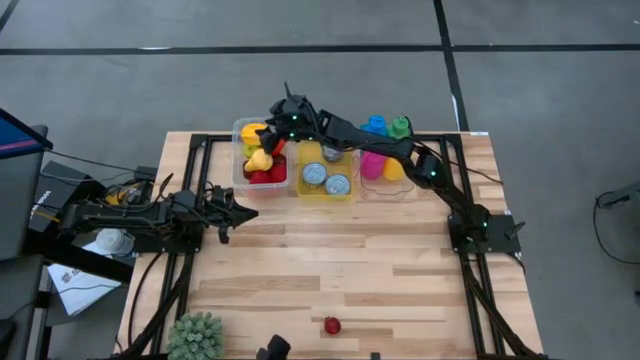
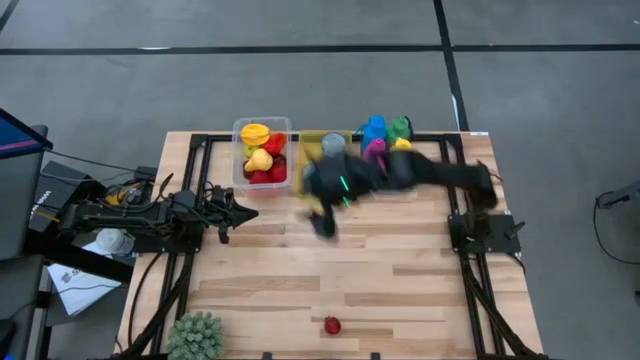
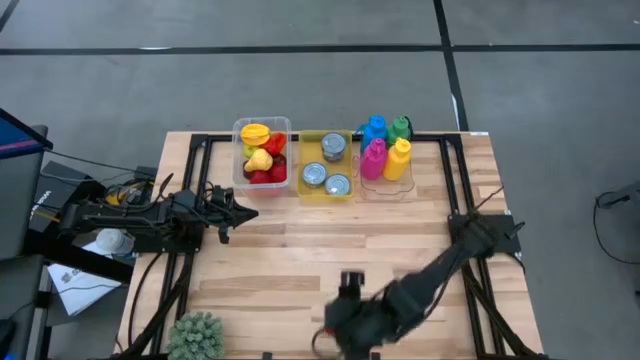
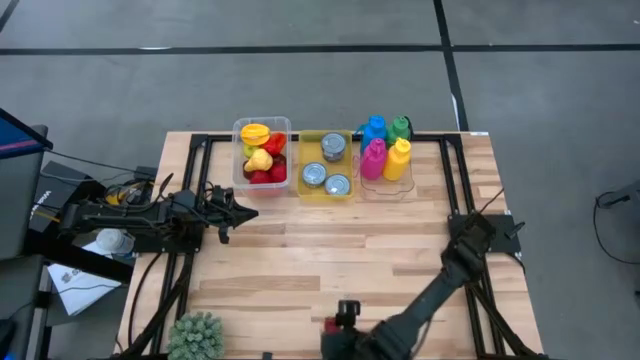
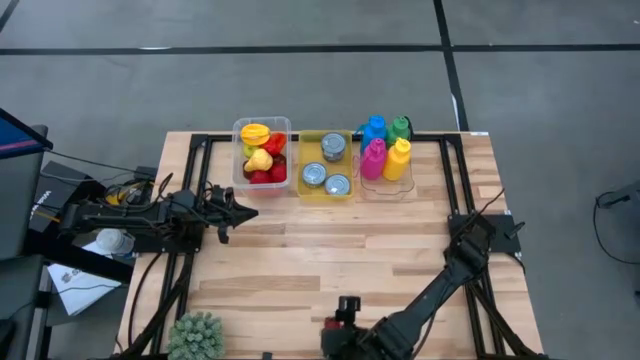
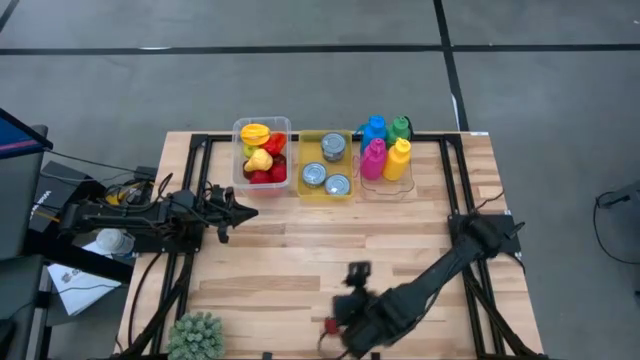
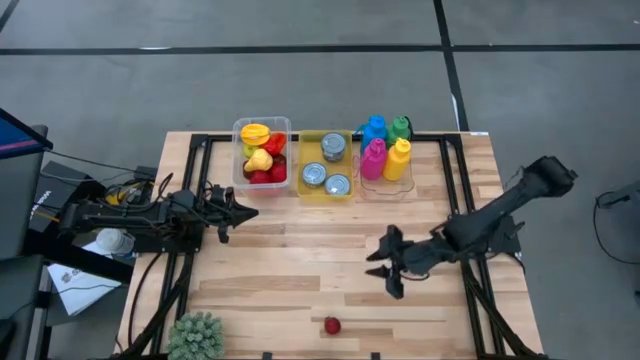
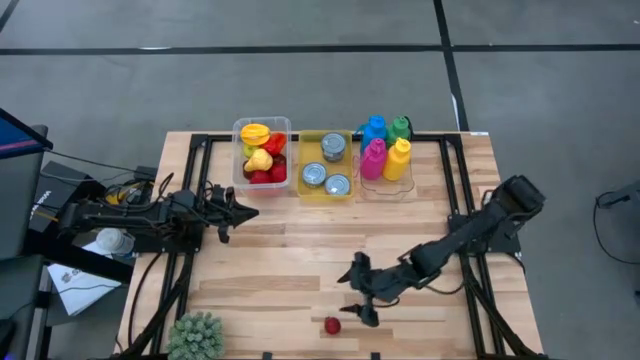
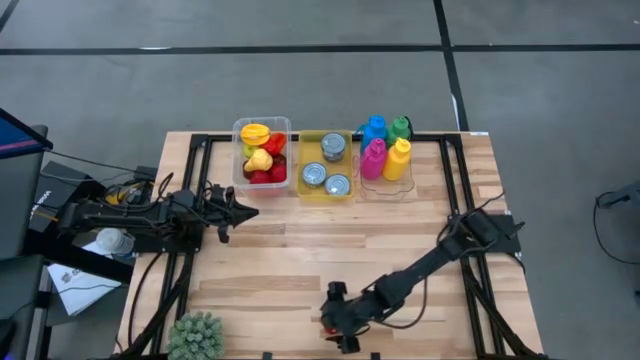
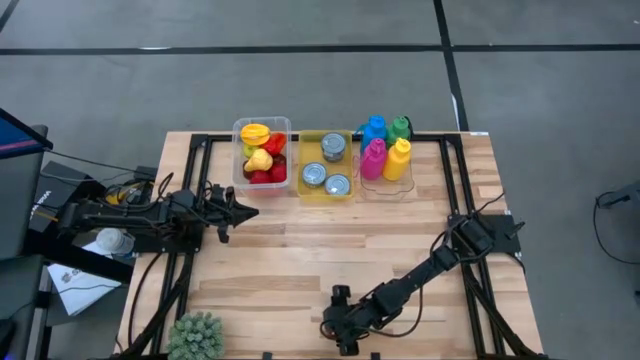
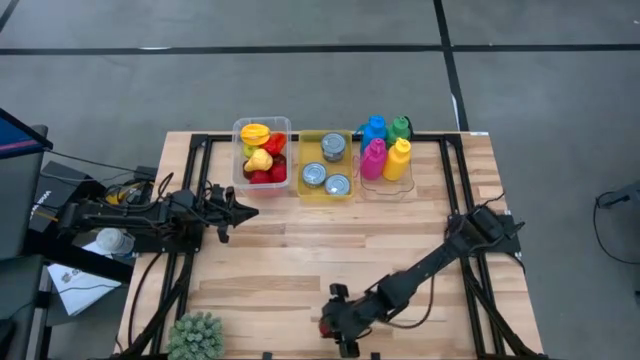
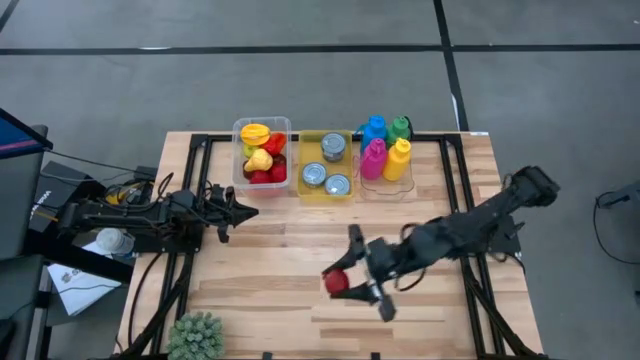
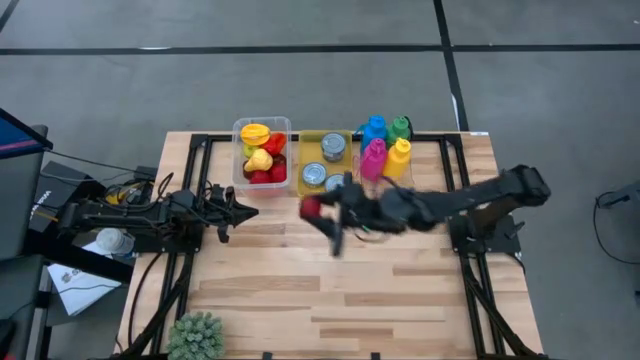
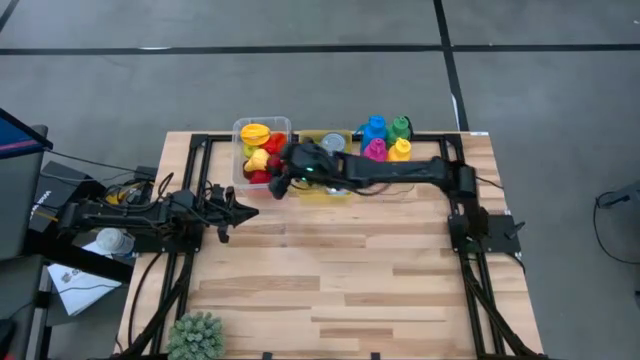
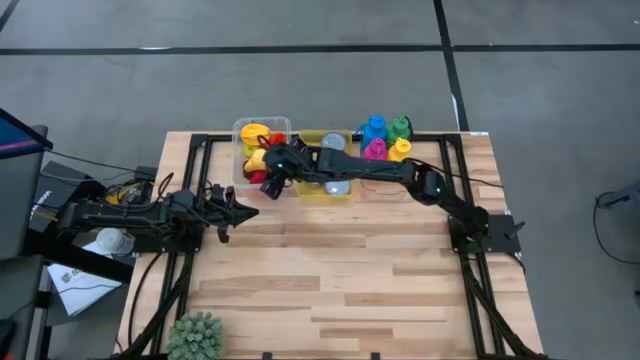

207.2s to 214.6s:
Task: Pick & Place Food Item
Put the pomegranate into the transparent container

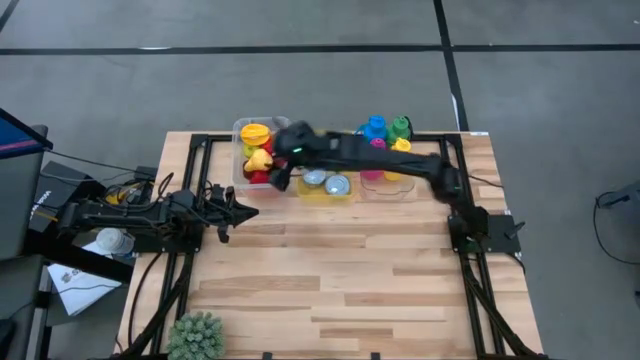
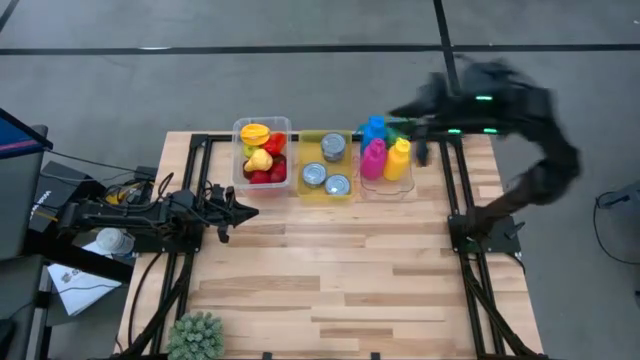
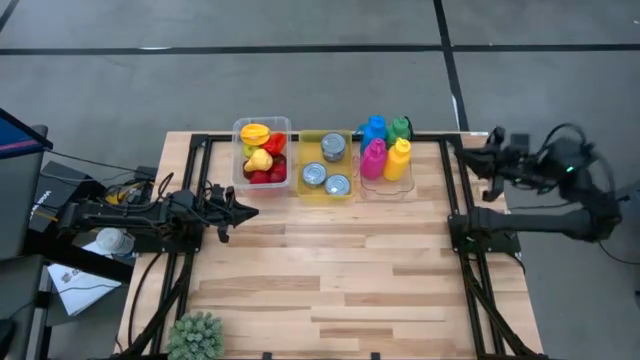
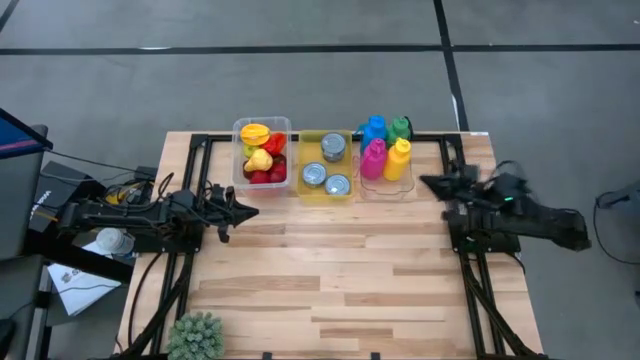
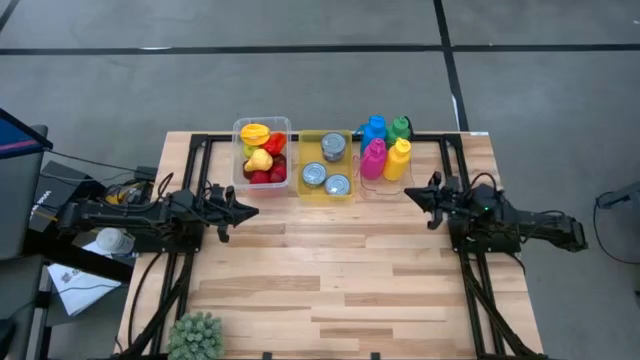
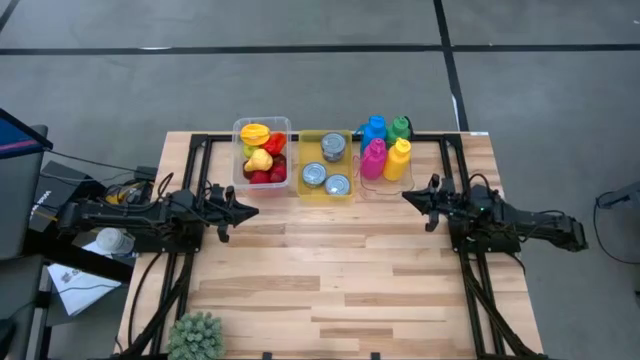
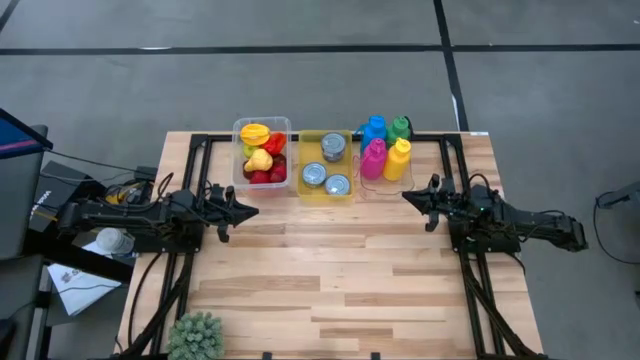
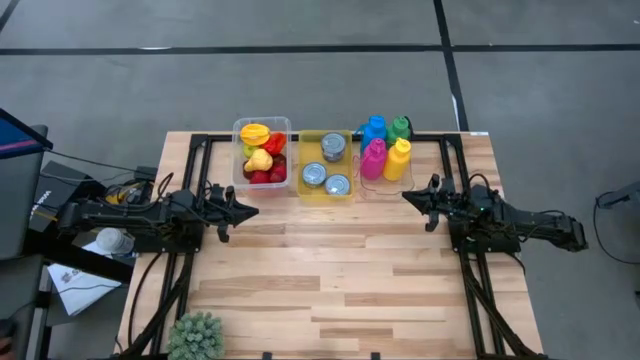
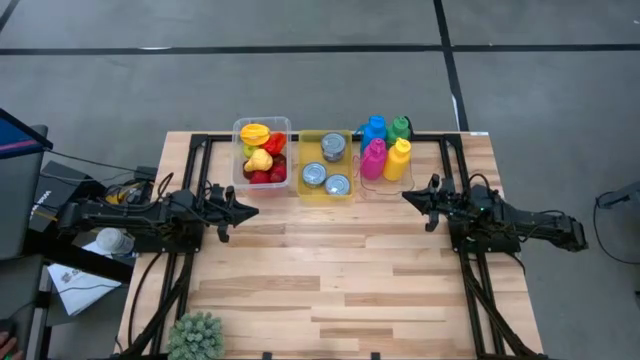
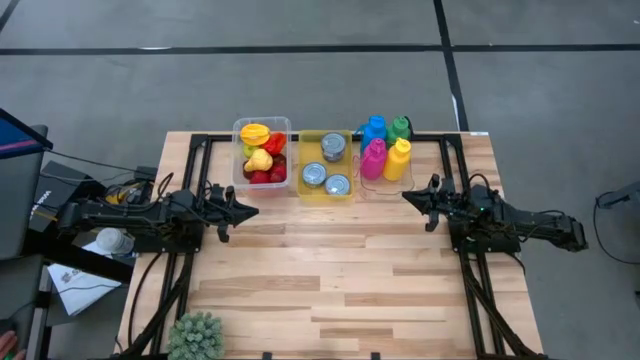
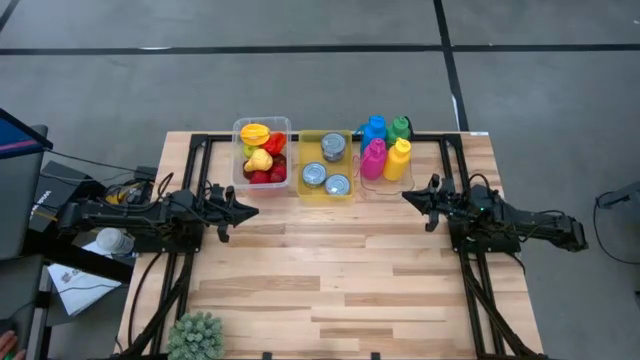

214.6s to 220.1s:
Return to Home Position

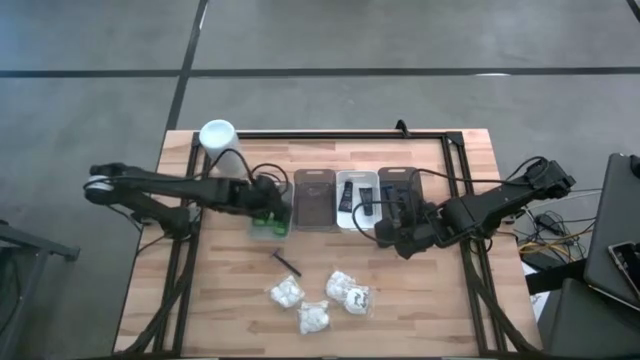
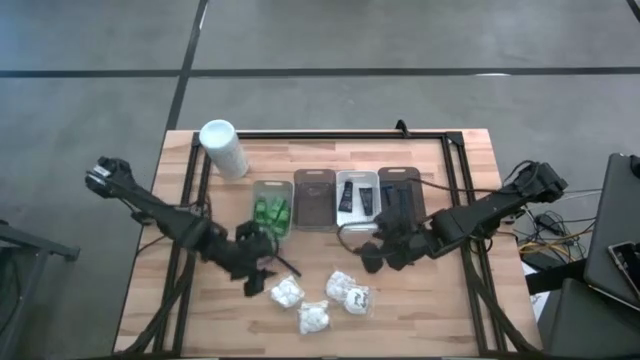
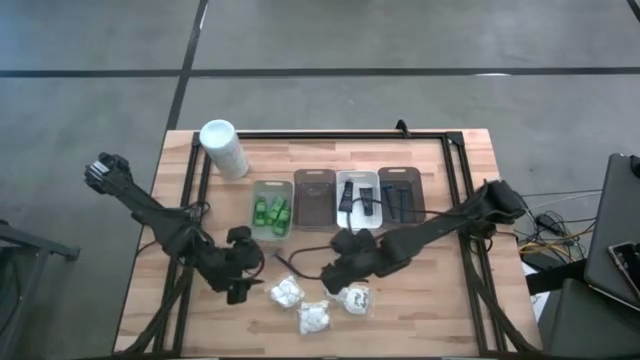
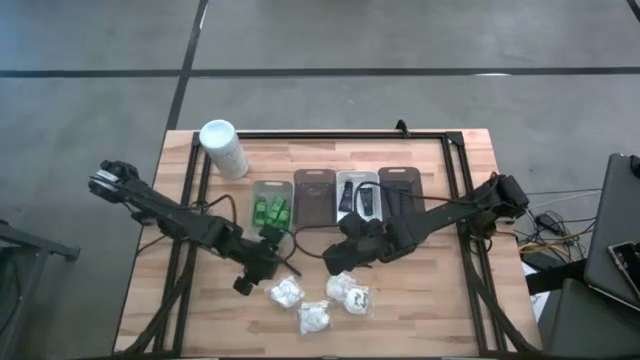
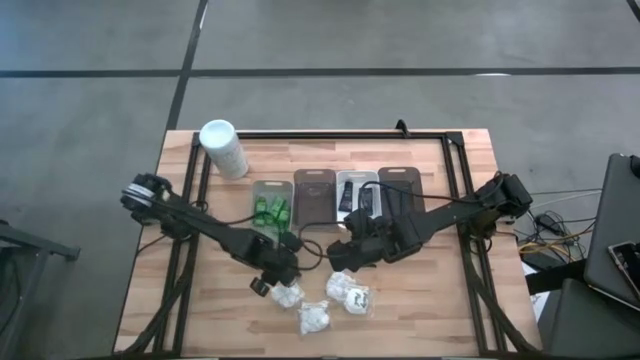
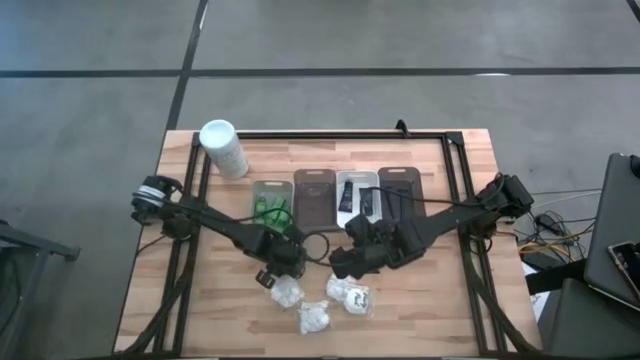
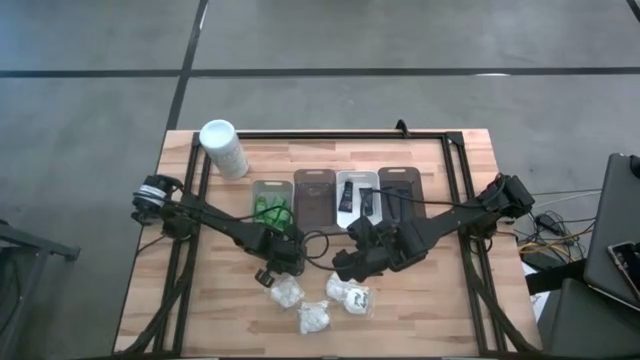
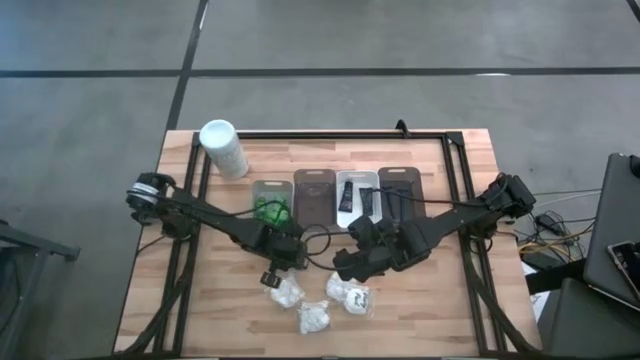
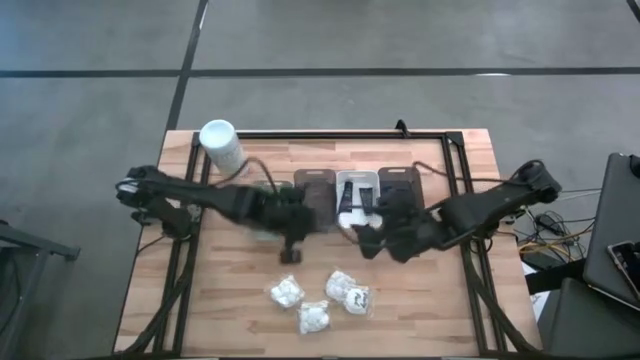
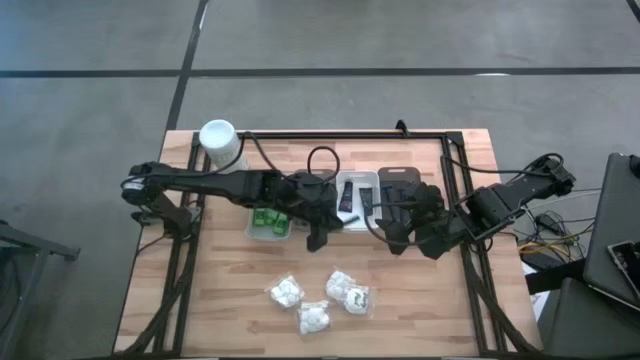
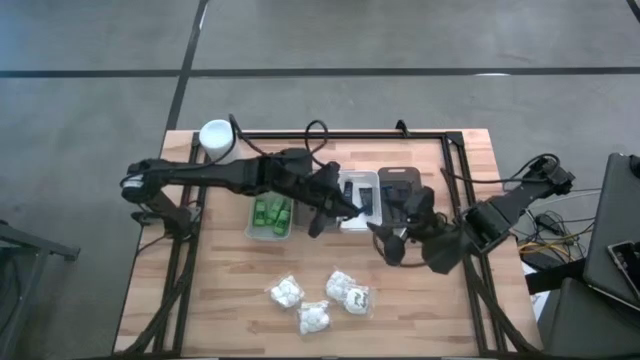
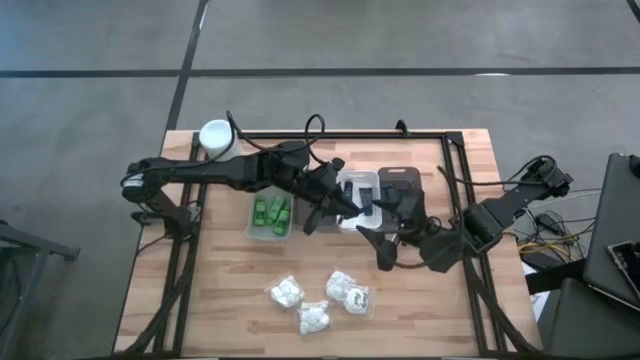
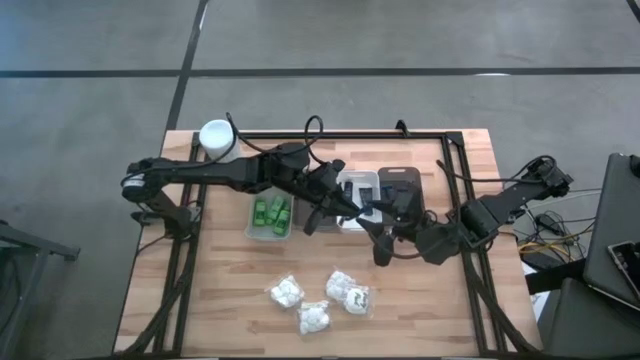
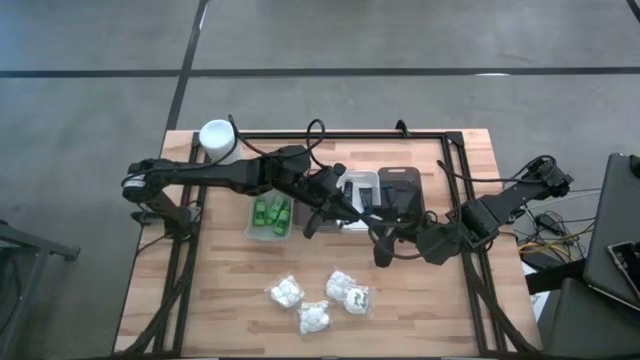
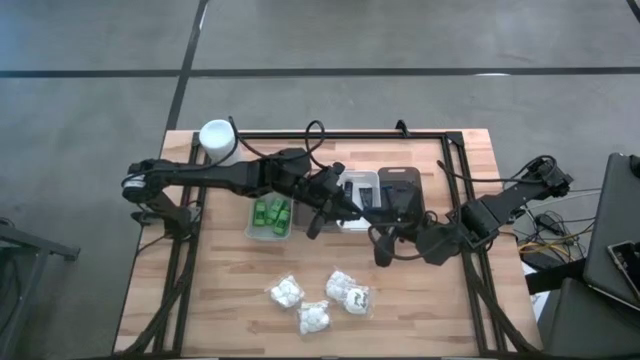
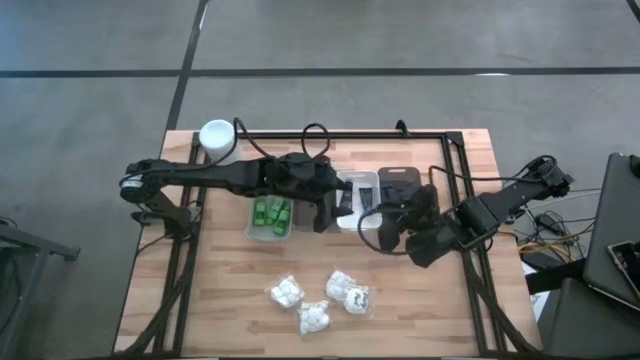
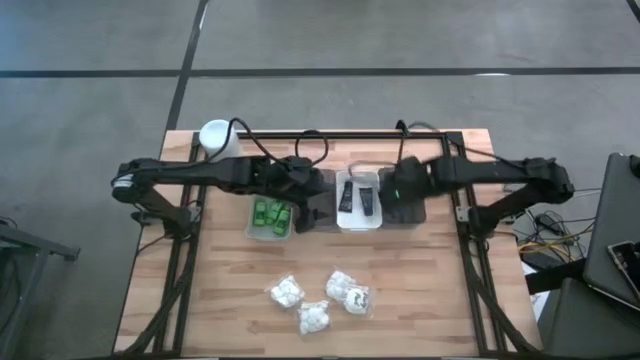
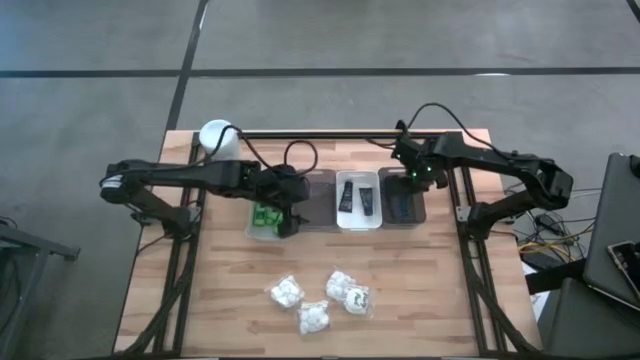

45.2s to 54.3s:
Task: Pick & Place Travel size toiletries
Put the blue razor into the right black bin
